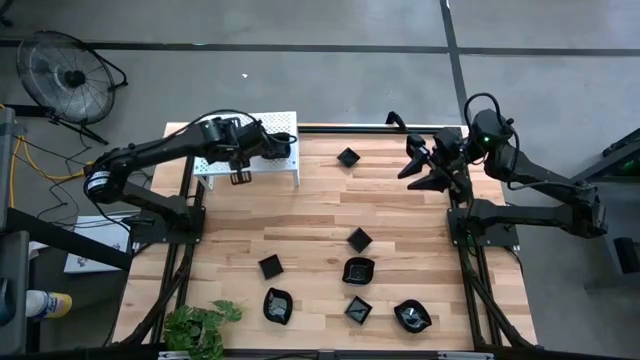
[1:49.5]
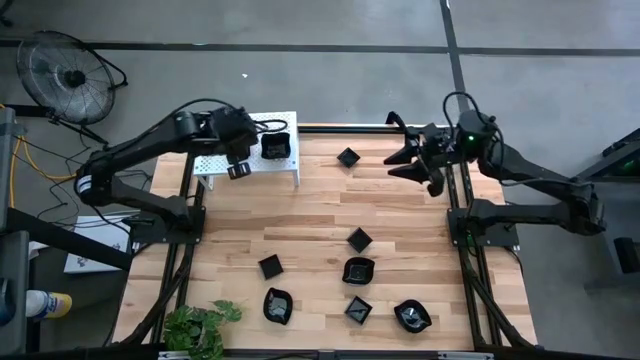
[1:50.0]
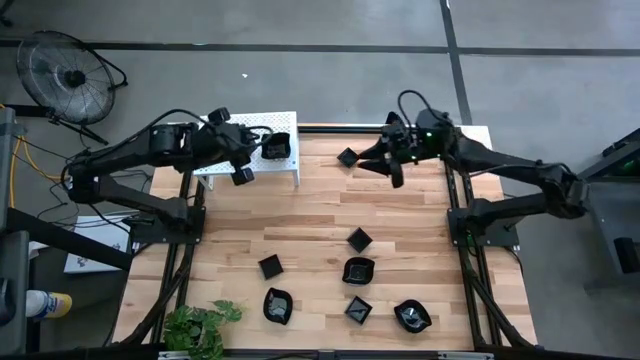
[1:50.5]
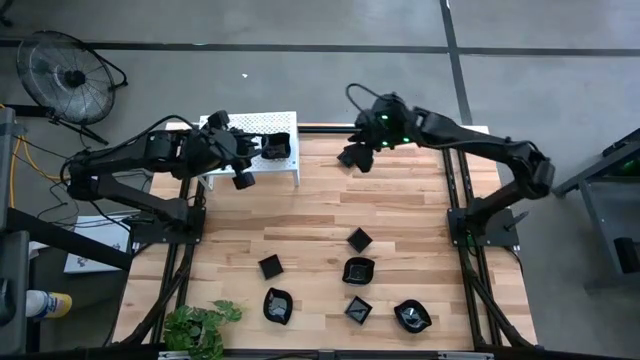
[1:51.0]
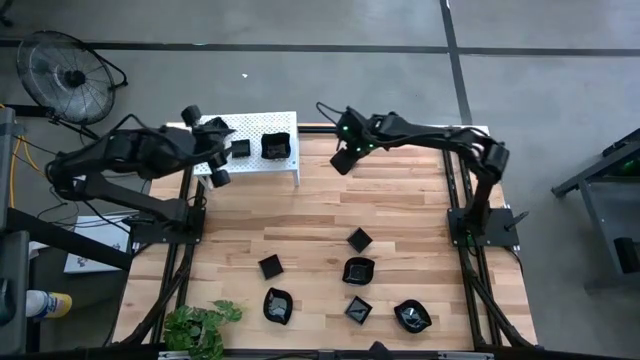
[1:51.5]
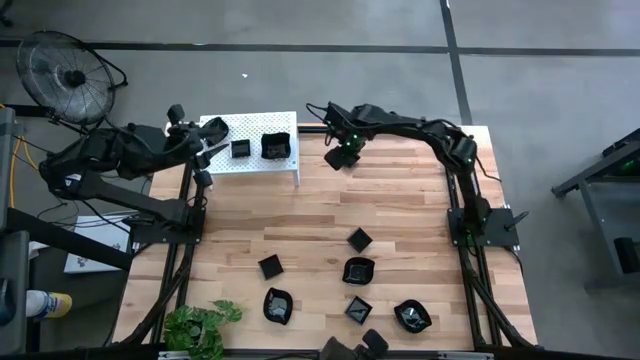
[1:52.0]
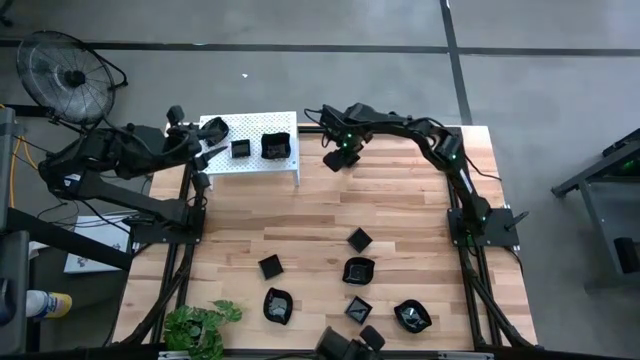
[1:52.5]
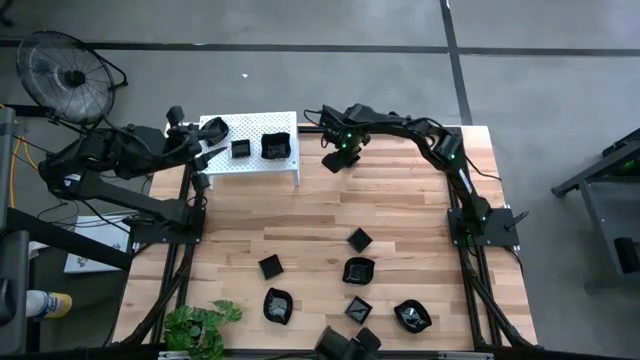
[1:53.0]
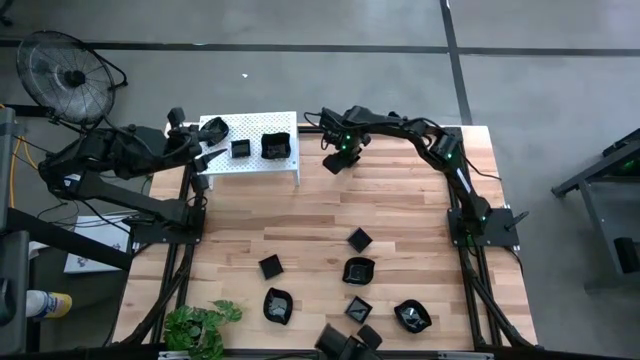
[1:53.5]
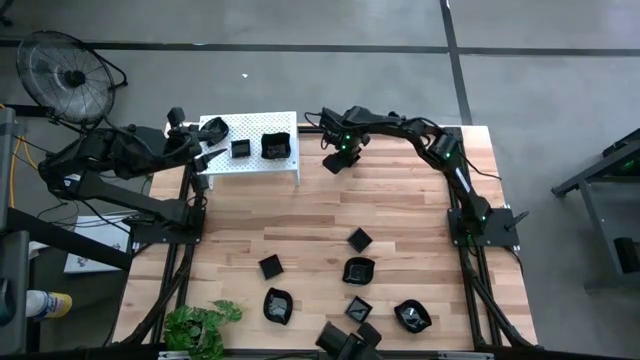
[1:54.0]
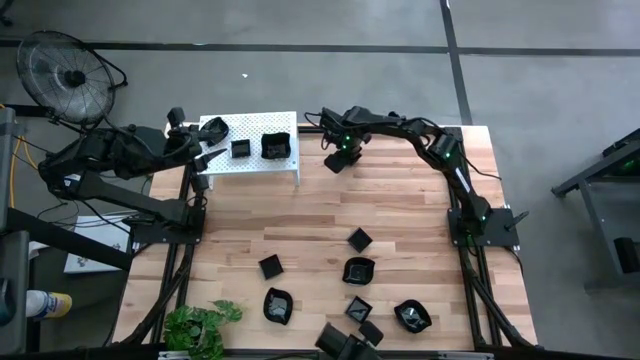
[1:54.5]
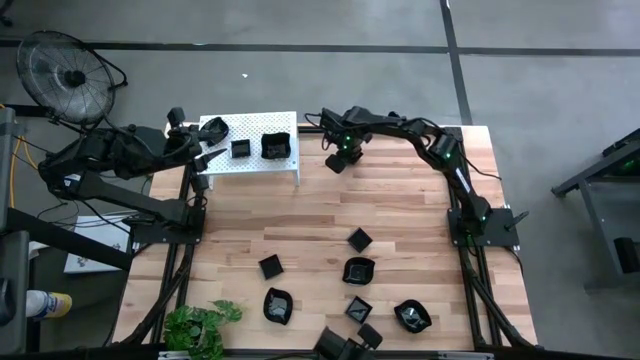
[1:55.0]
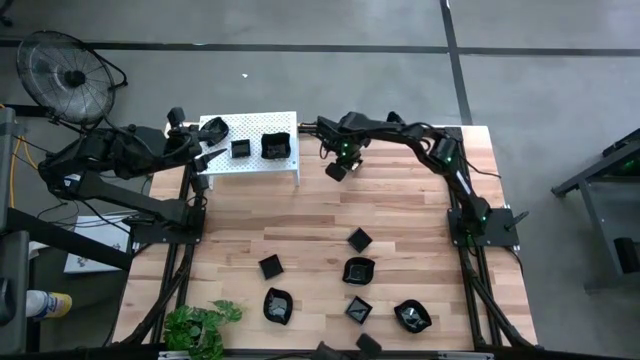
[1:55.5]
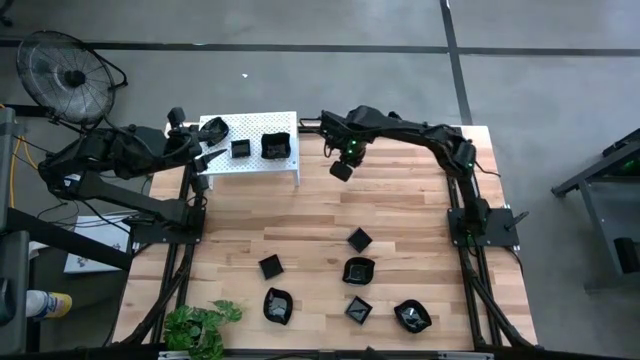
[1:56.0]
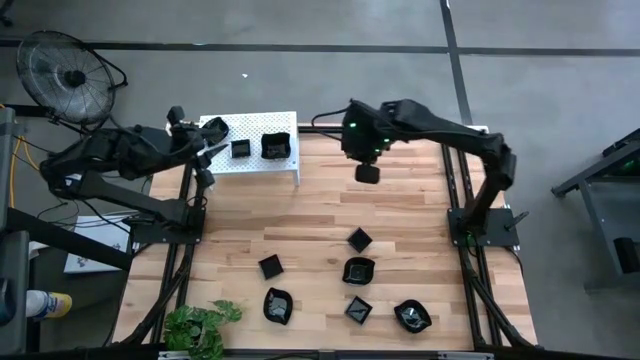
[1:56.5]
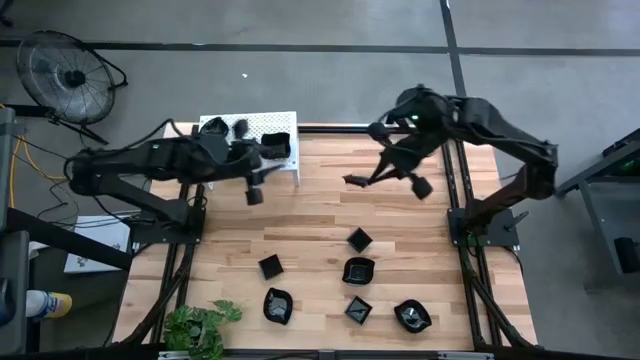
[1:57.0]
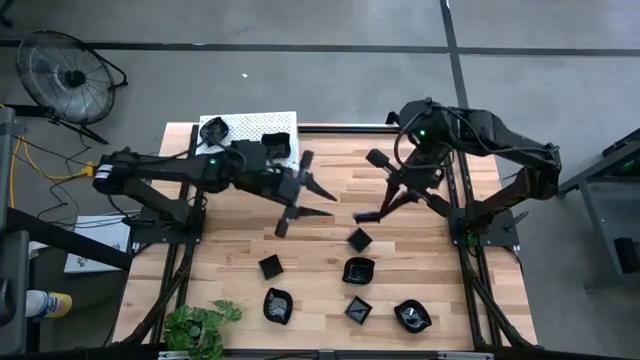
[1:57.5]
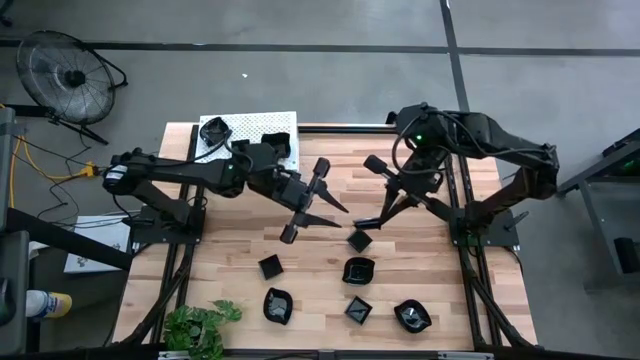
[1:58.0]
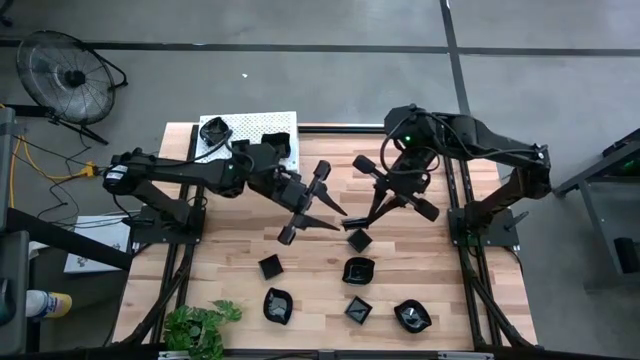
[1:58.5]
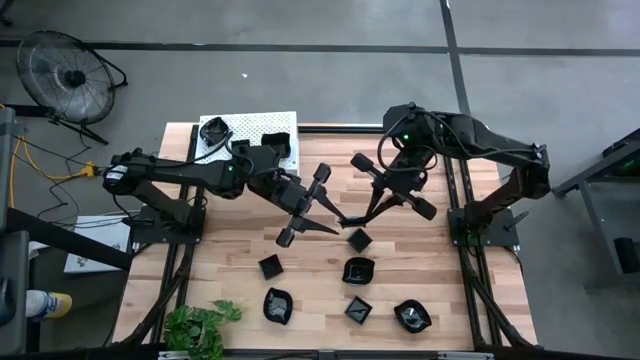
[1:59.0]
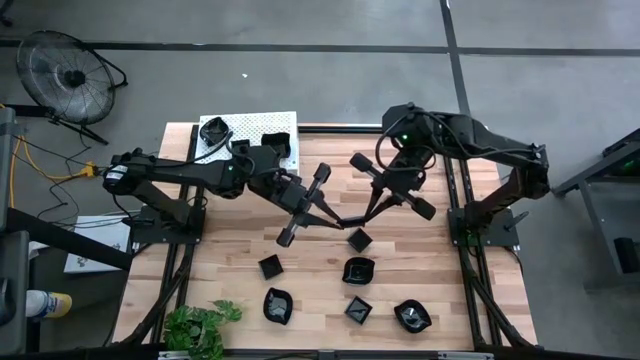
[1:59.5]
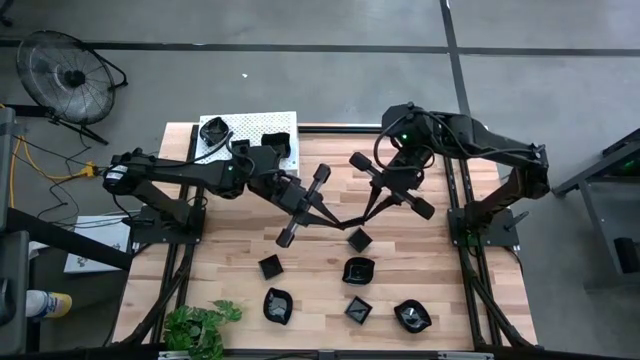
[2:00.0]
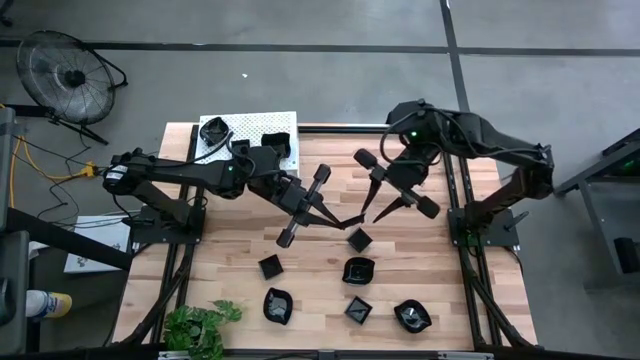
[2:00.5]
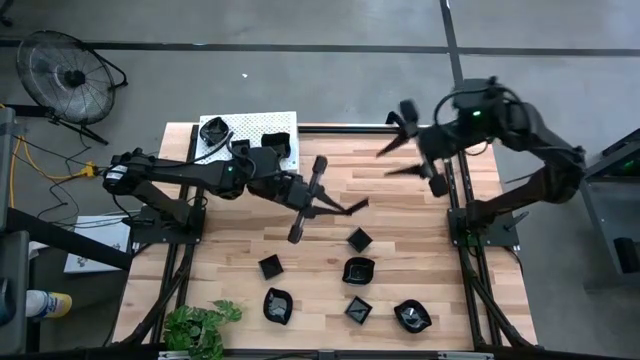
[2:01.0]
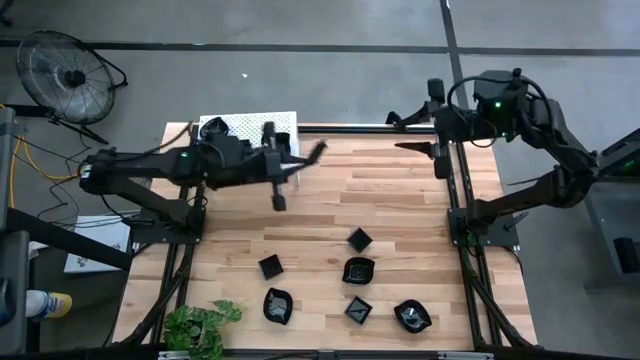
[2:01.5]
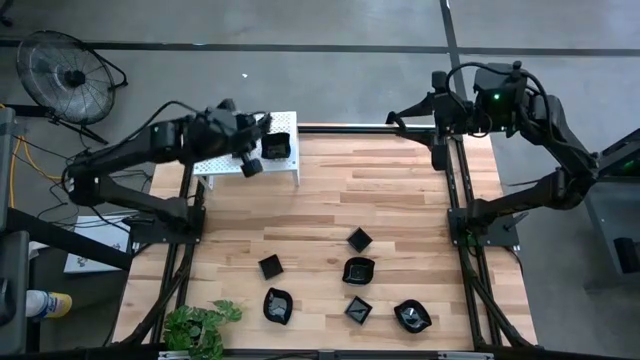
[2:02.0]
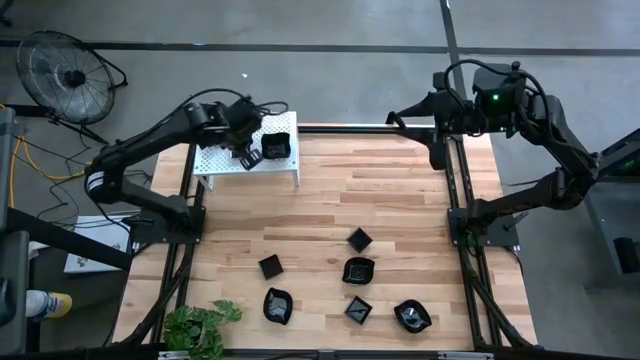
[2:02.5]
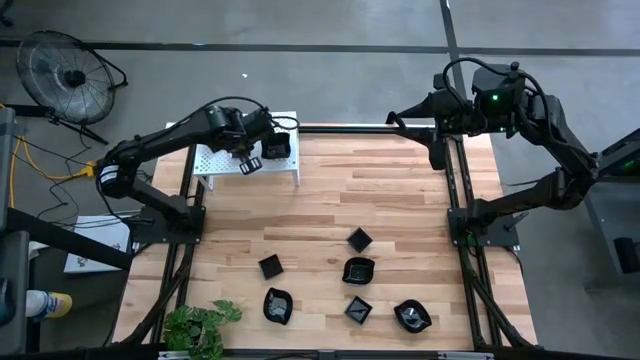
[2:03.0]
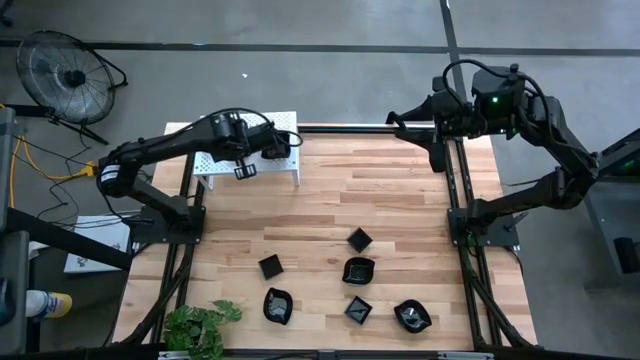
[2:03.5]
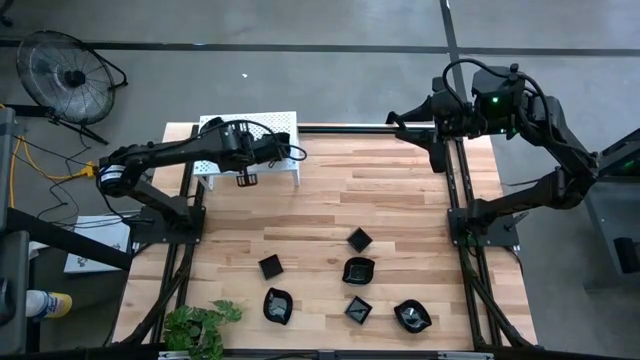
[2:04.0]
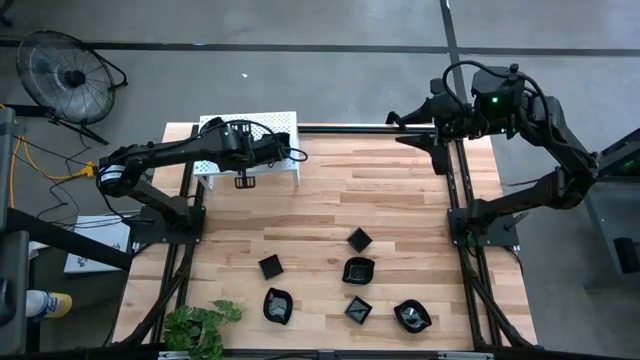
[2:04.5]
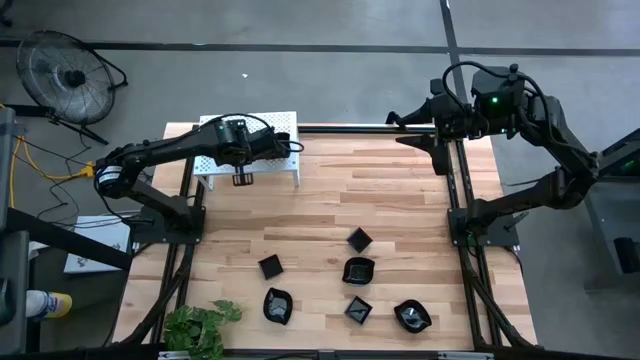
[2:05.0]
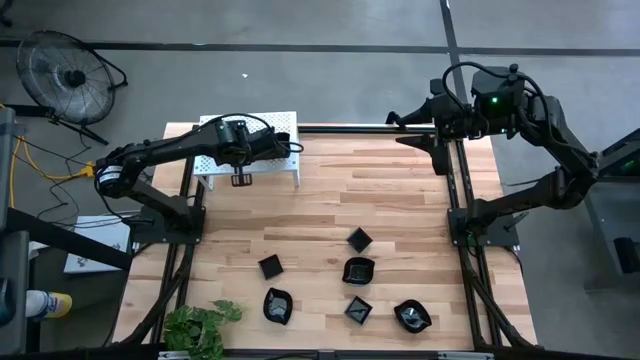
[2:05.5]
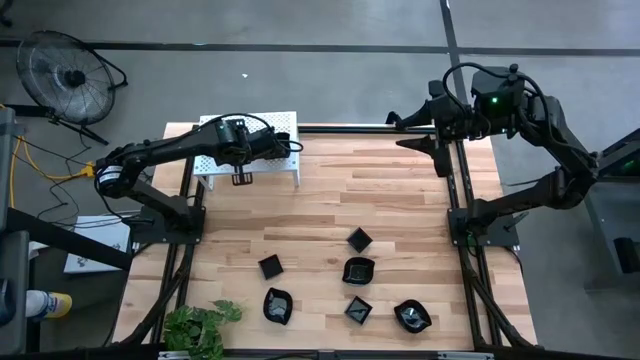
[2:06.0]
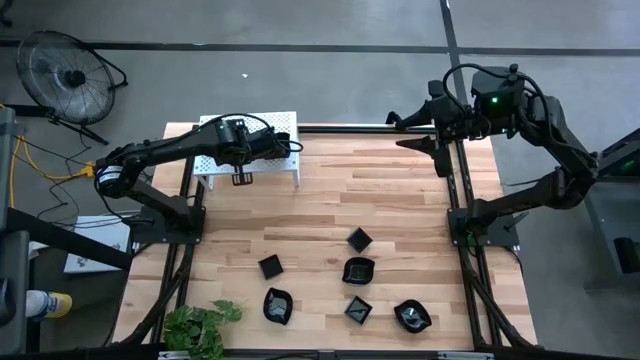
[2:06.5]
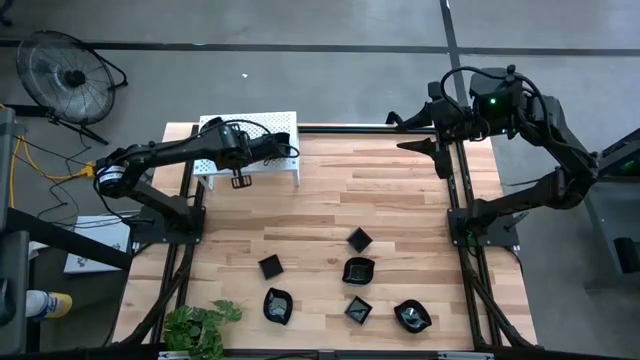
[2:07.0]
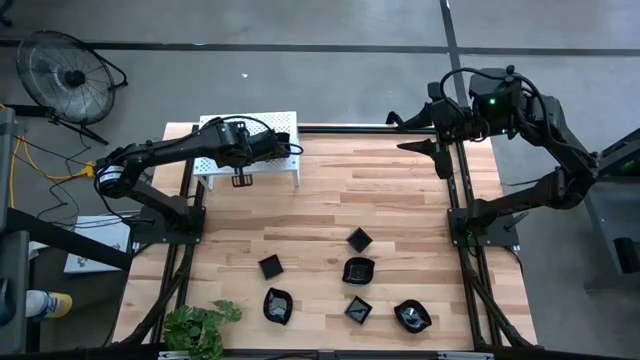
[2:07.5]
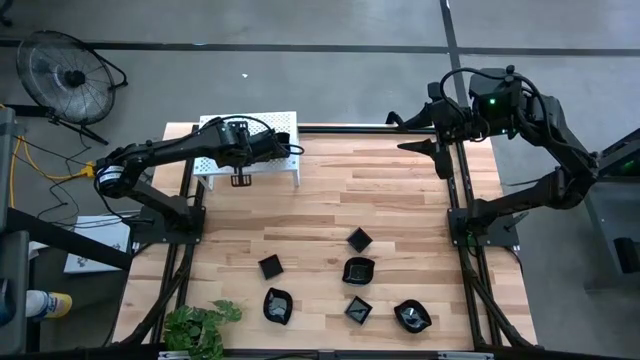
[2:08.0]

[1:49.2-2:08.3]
Task: Pick & Place Mini shaped plates
Stack the black square plate on the black square plate on the shelf

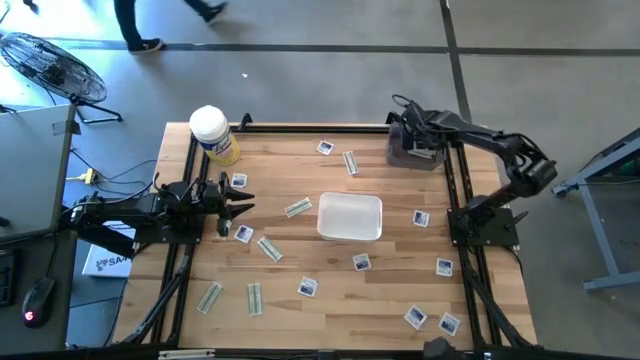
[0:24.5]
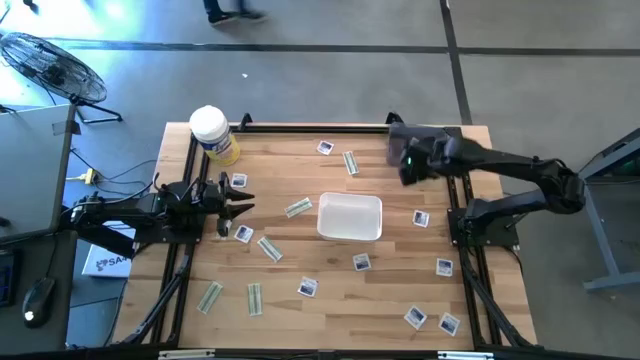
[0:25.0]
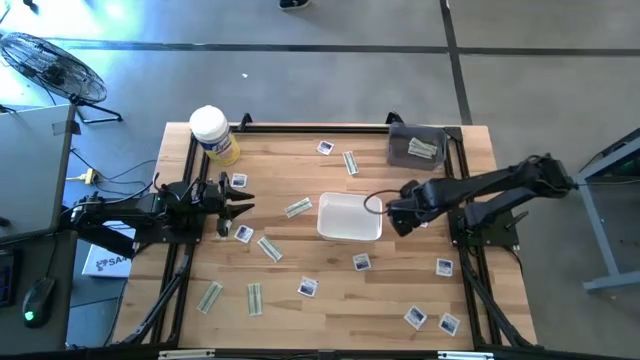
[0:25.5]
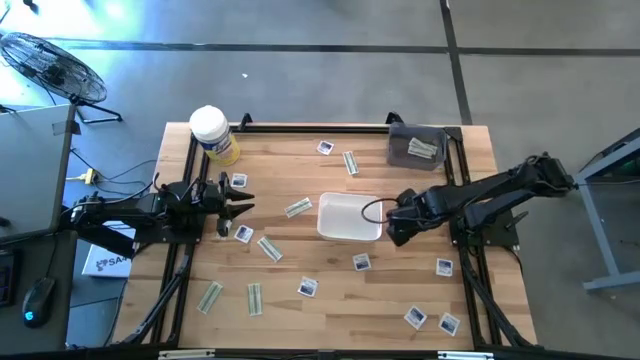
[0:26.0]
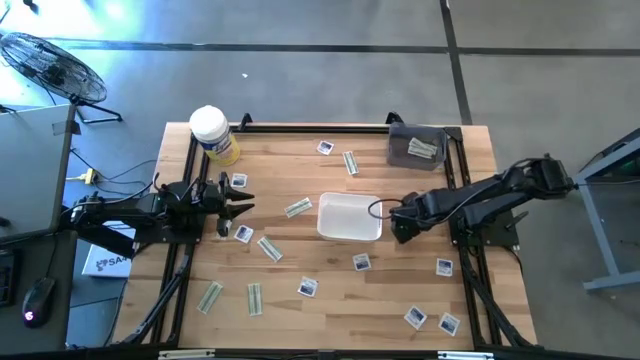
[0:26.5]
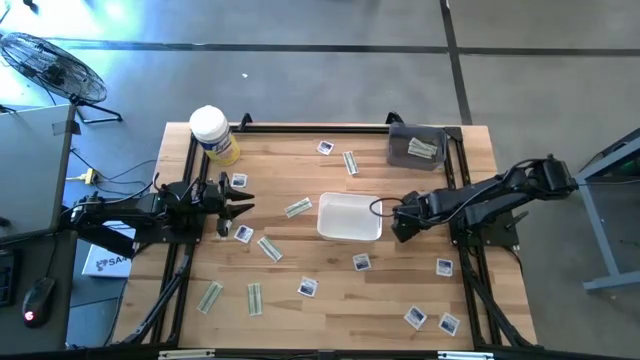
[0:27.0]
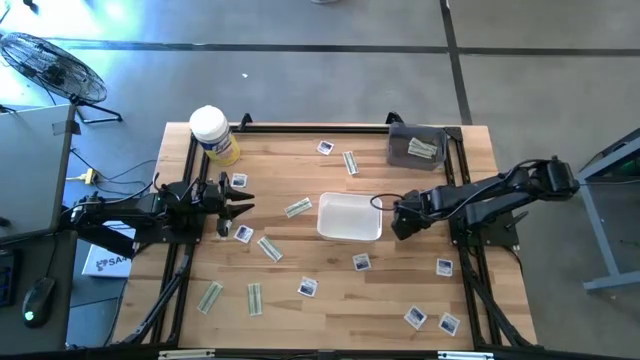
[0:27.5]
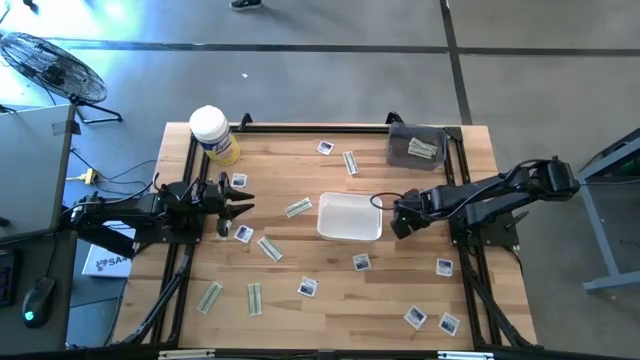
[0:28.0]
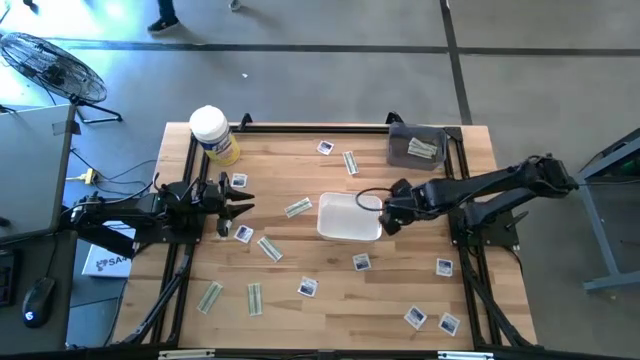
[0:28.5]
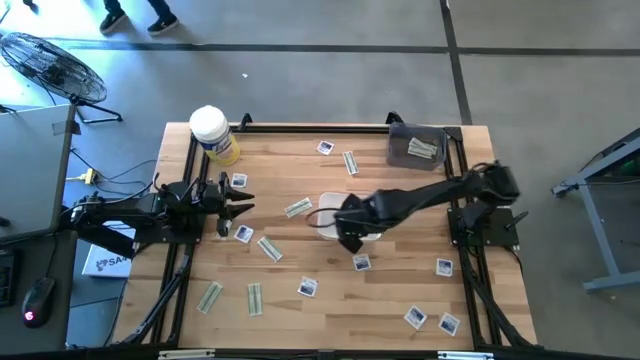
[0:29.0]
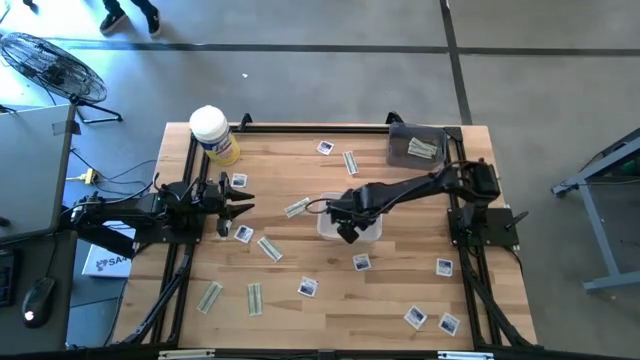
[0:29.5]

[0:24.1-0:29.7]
Task: Pick & Place First Aid Supplies
Put the blue alcohol pad into the white bin
